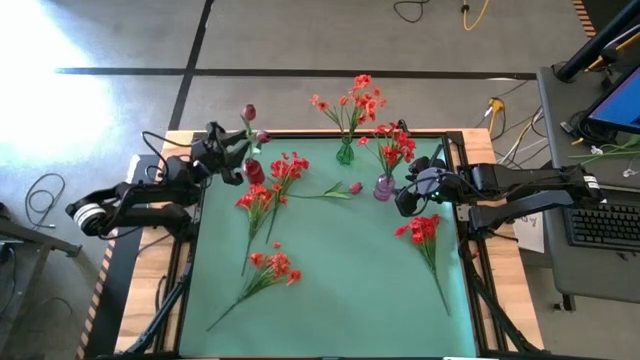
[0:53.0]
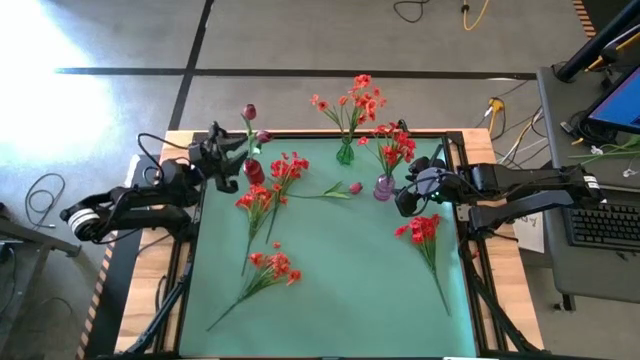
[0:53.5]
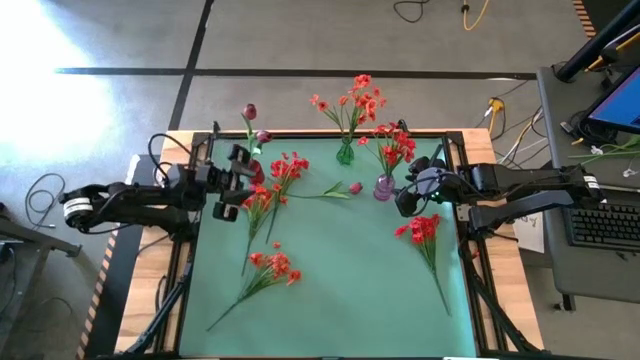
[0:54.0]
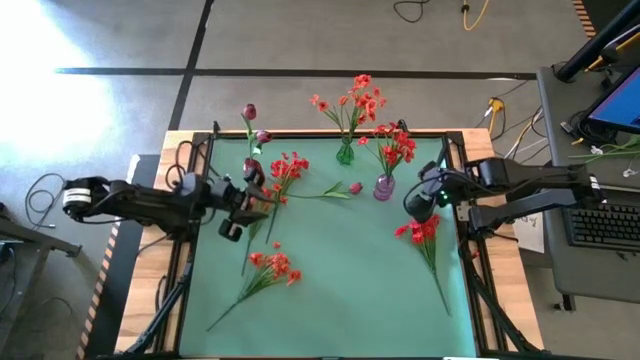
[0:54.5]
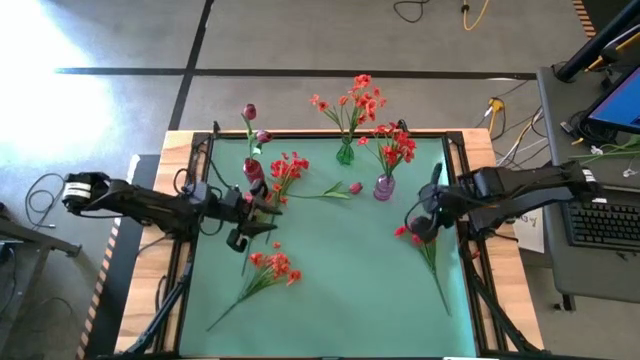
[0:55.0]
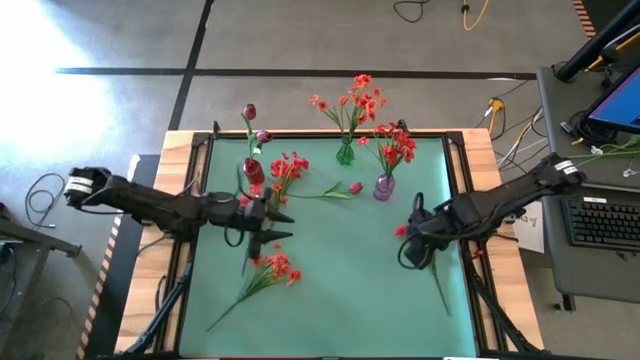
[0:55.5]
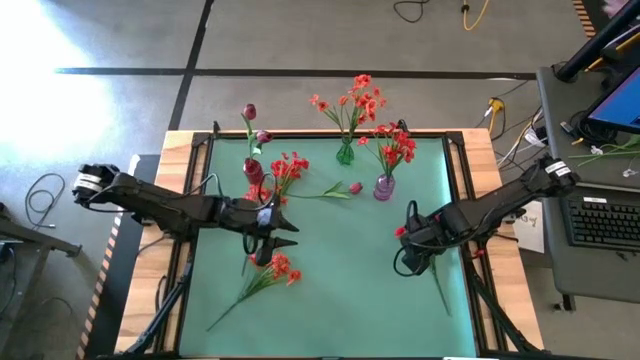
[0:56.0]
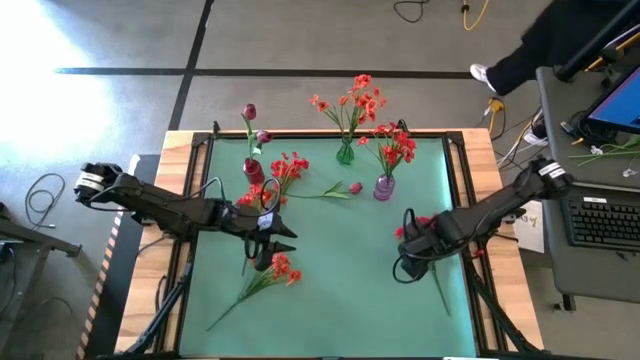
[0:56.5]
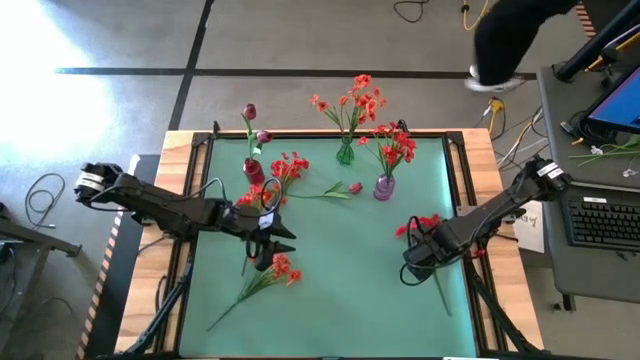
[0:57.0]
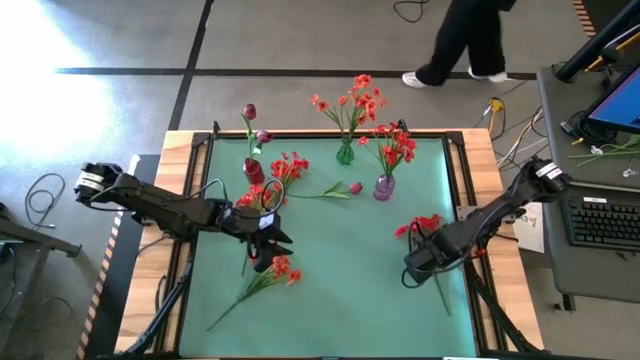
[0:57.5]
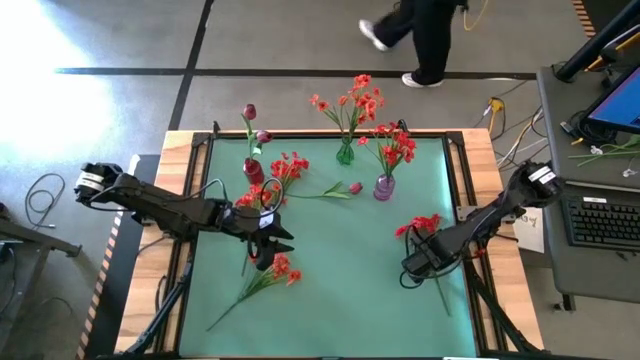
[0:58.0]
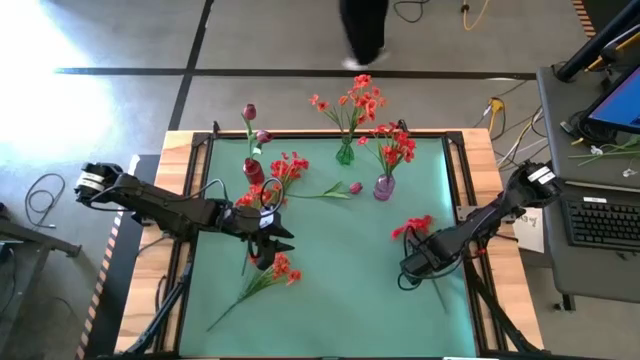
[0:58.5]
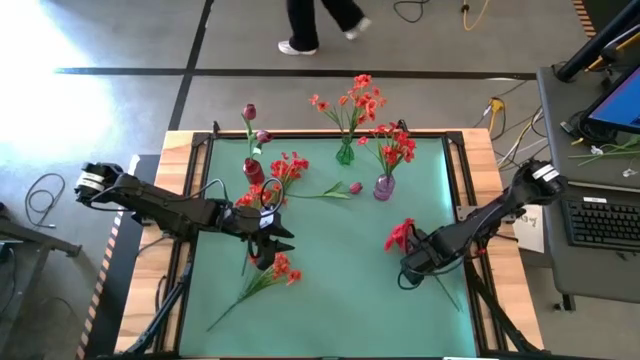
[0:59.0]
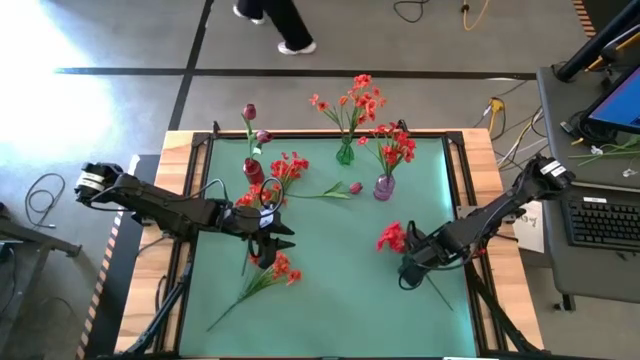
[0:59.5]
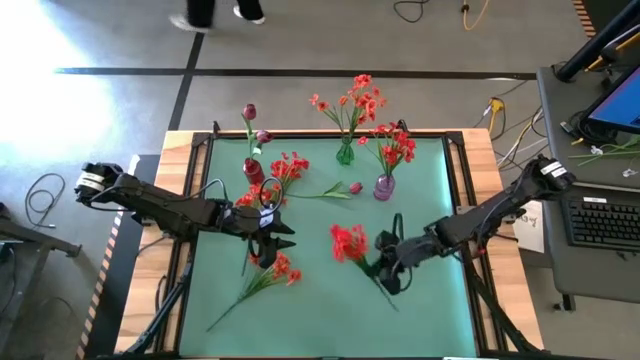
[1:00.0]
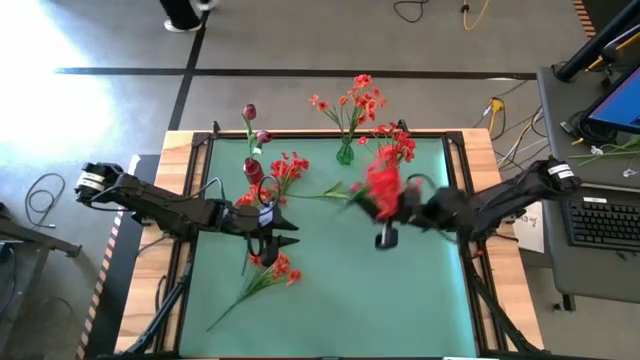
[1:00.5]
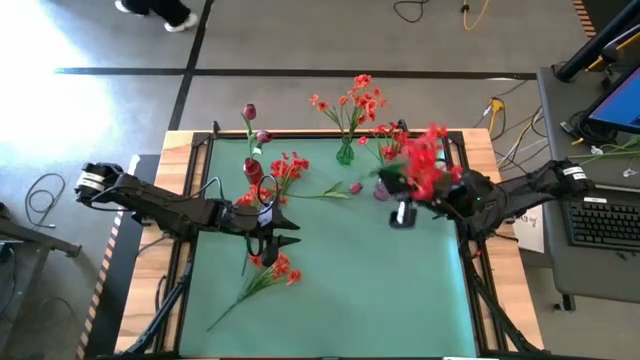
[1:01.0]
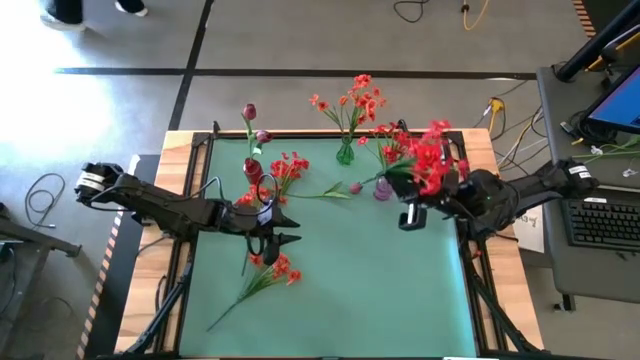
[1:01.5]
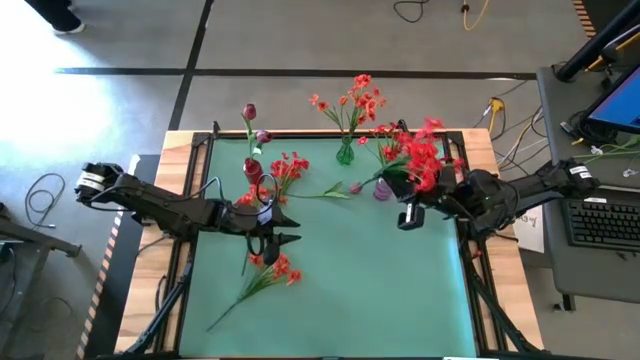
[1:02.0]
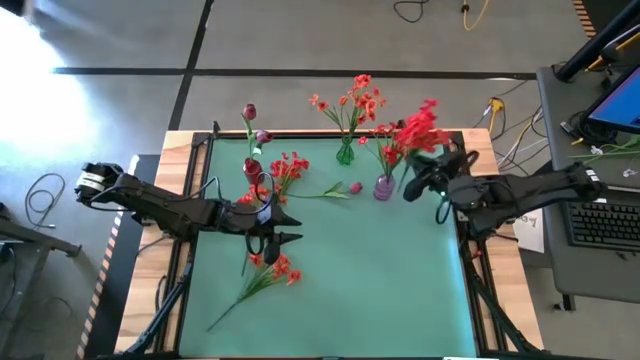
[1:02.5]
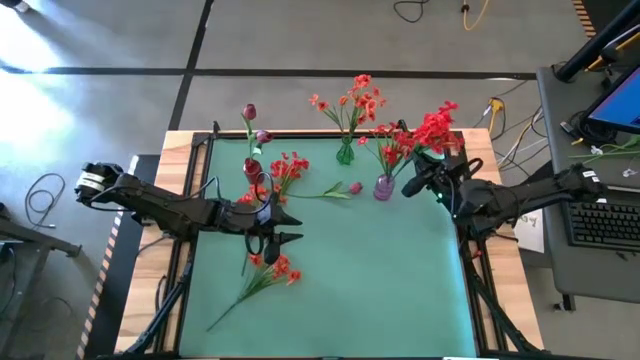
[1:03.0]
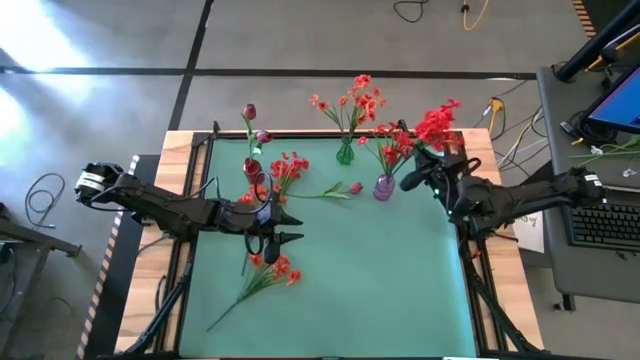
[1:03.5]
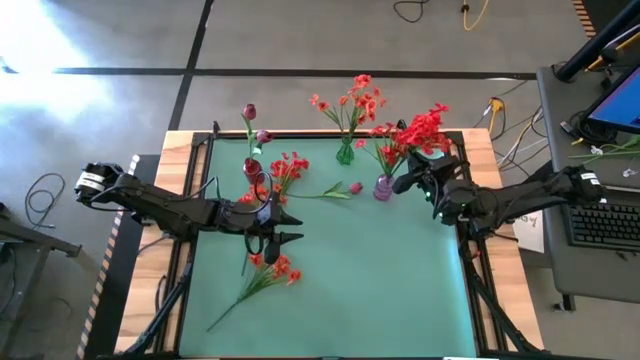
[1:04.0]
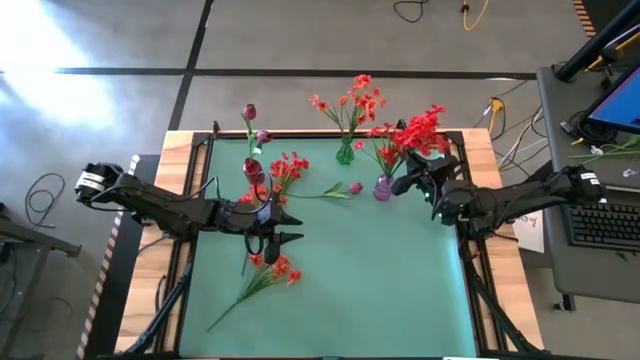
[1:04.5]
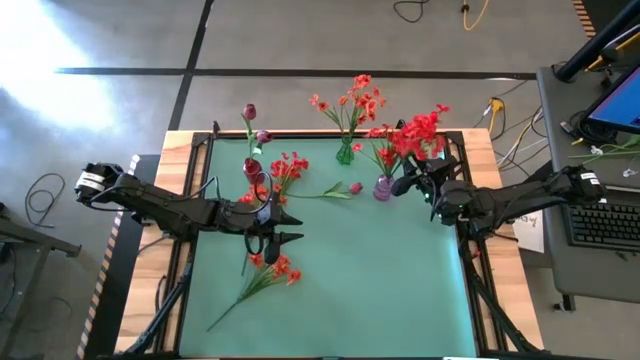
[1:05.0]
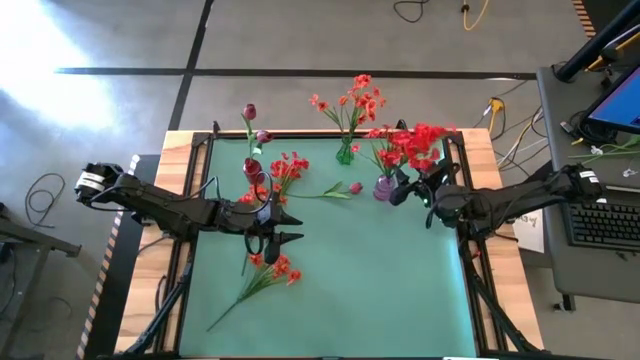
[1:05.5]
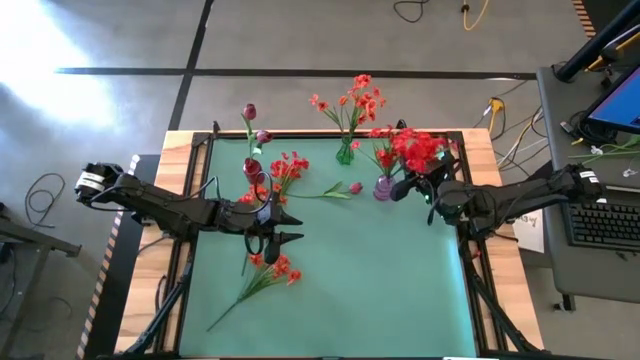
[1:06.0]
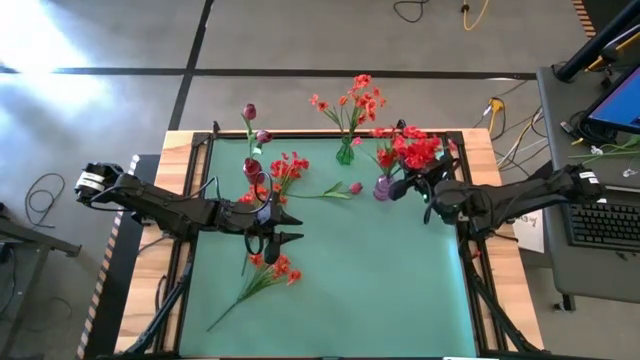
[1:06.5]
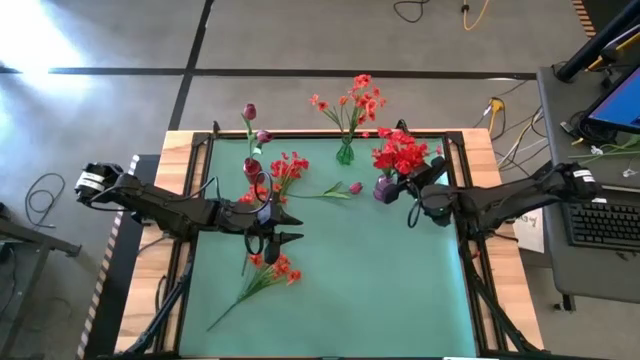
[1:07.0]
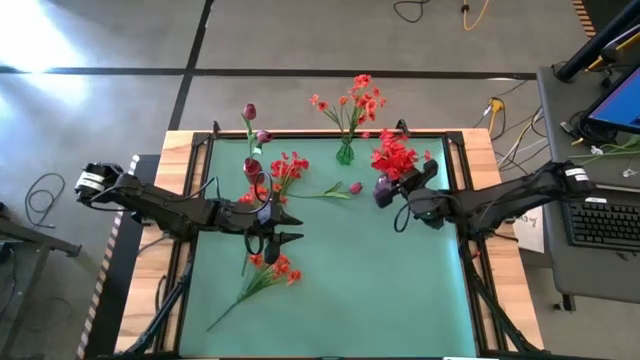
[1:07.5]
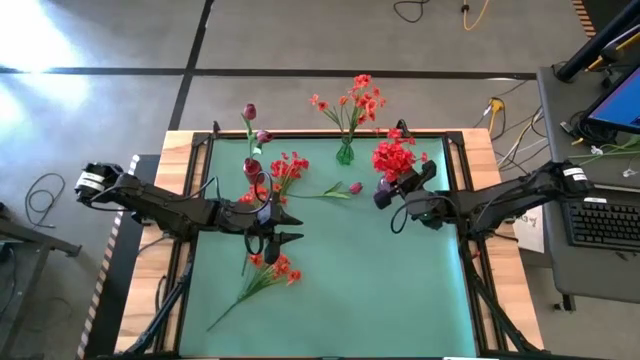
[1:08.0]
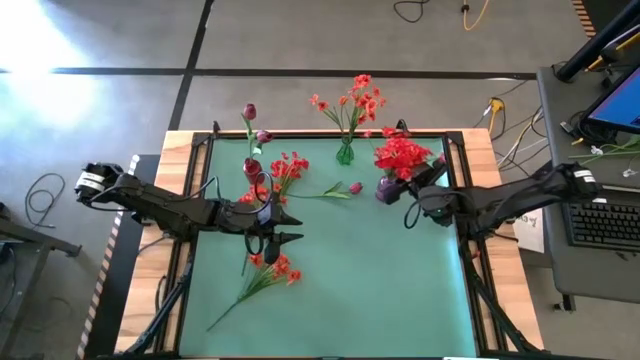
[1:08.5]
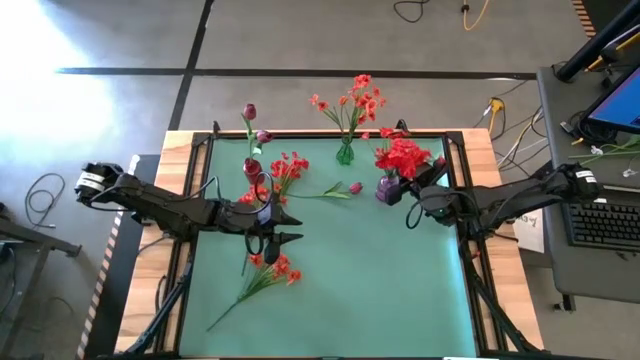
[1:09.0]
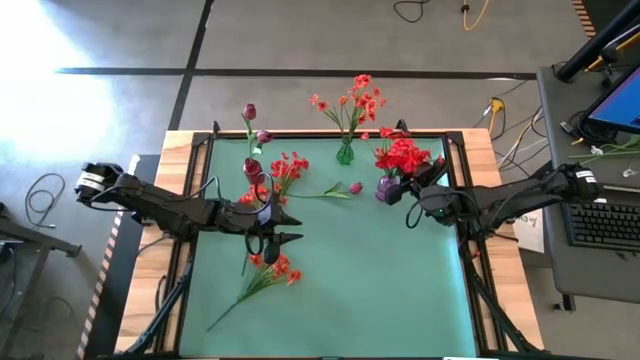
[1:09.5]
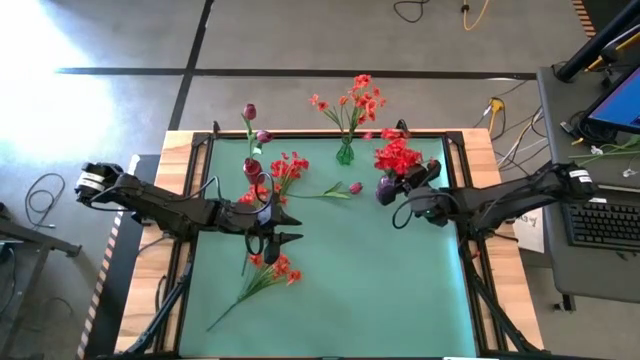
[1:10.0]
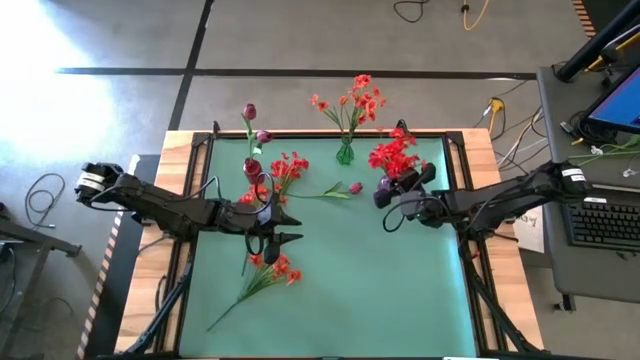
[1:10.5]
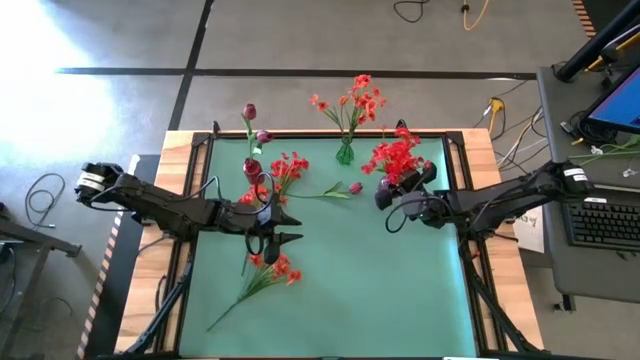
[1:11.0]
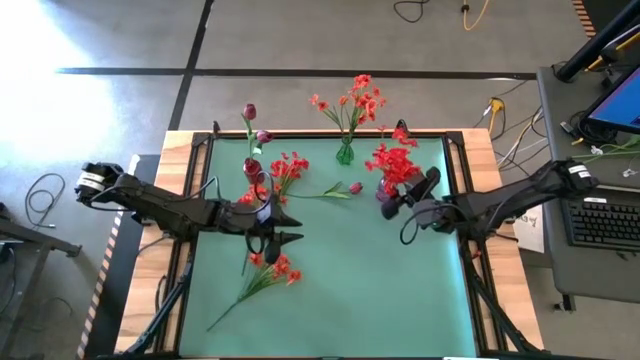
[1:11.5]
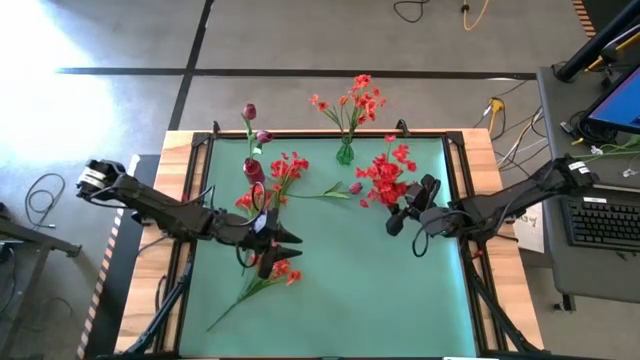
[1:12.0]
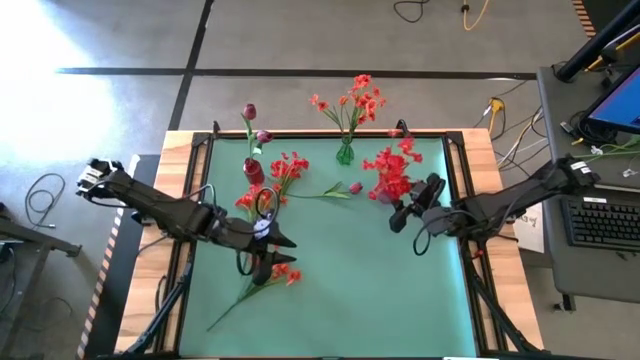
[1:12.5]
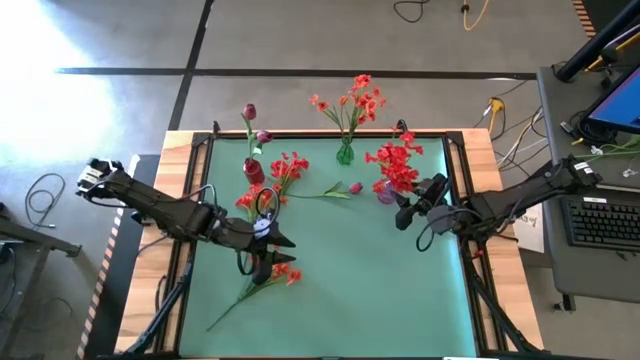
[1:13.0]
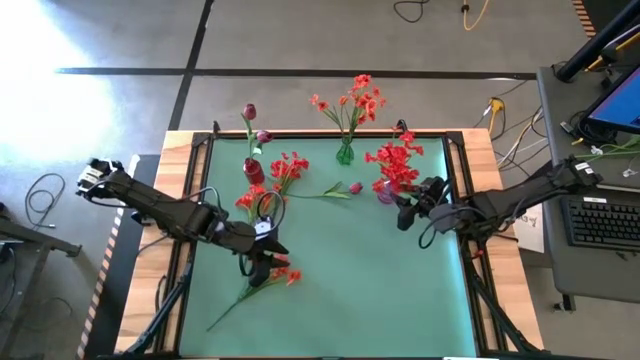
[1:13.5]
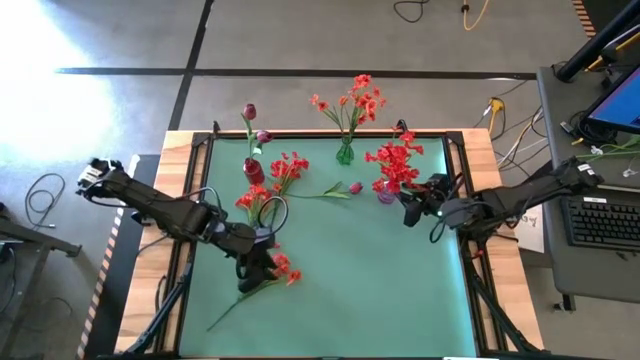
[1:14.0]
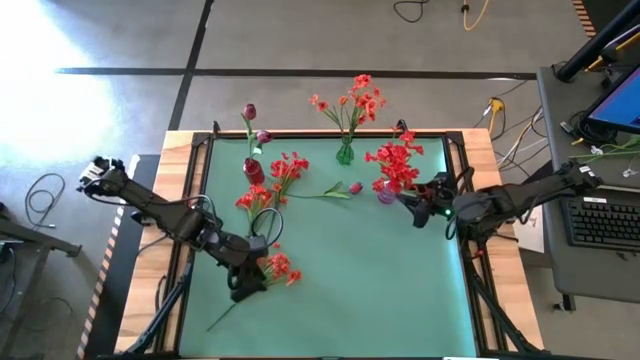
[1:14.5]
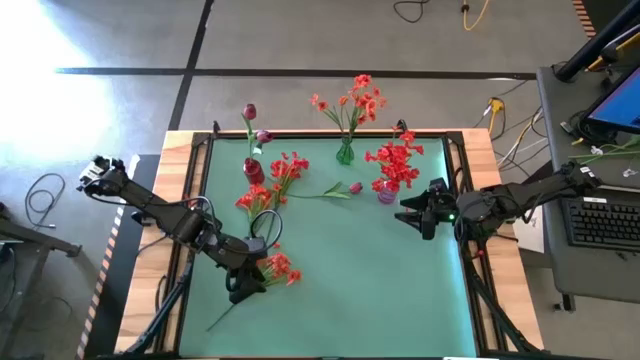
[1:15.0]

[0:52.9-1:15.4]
Task: Sort flowers into vase by color
Put the bottom red flowers into the violet flower vase
